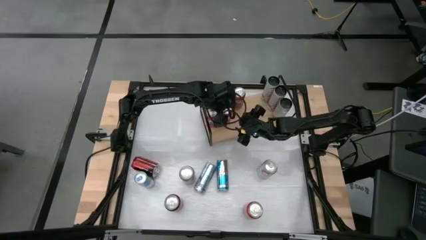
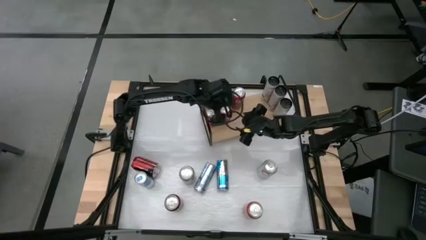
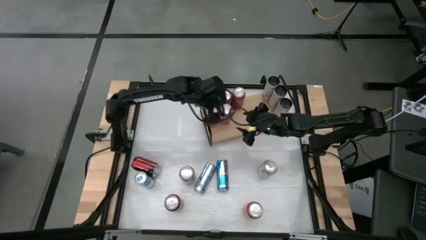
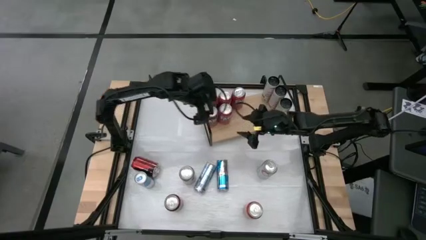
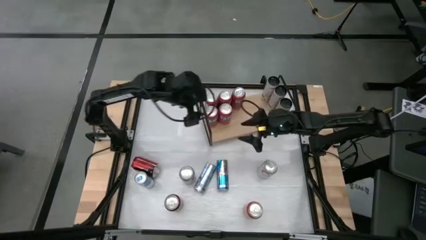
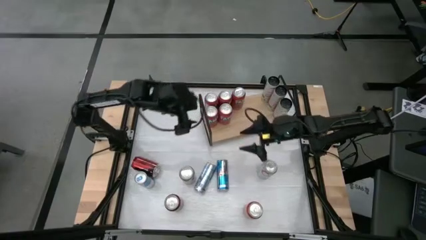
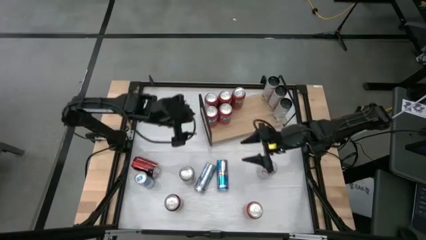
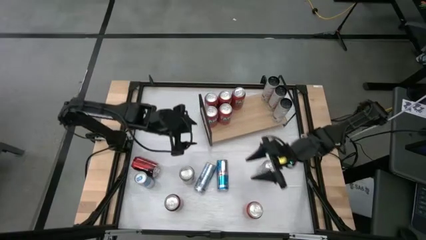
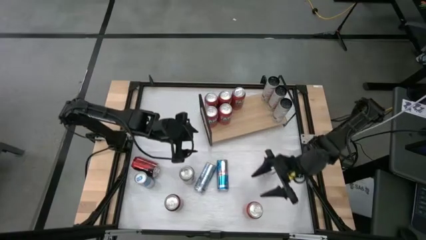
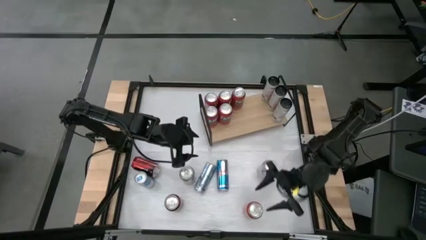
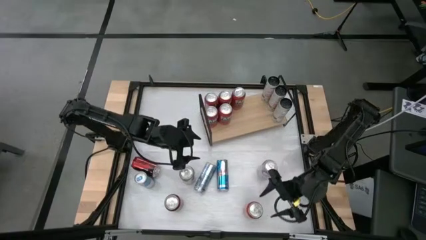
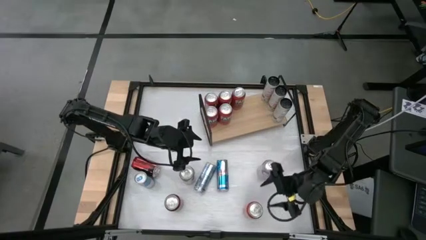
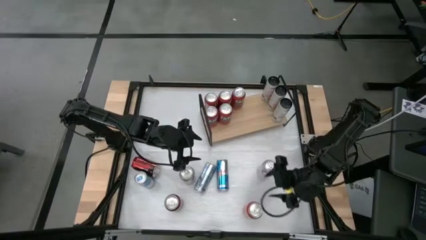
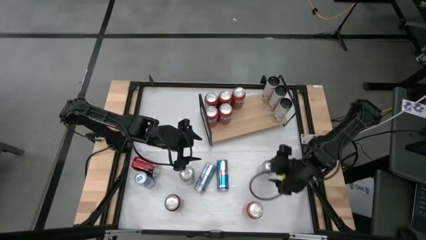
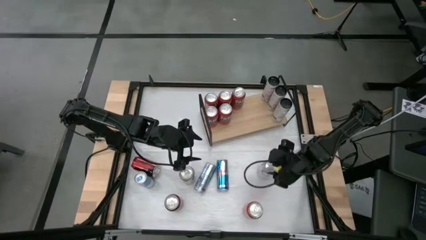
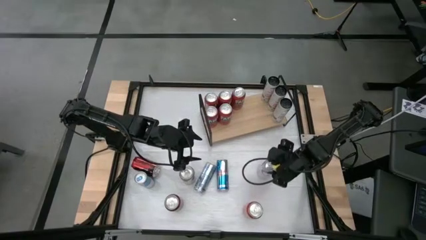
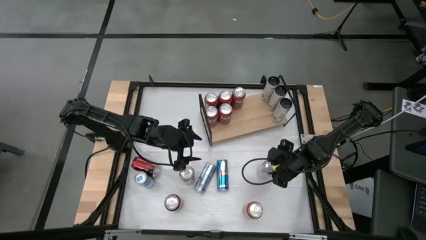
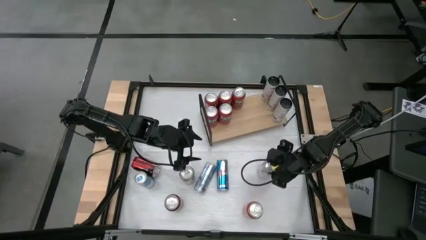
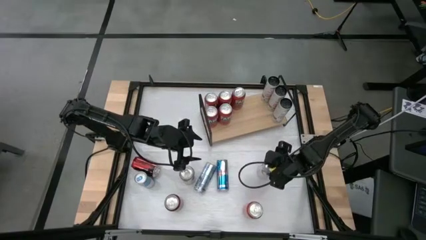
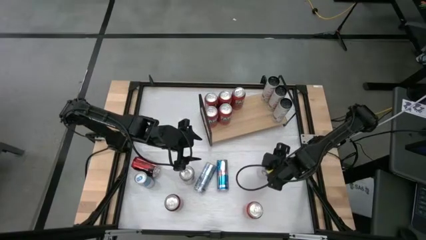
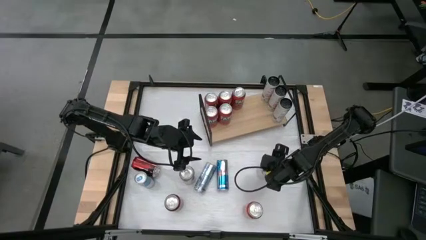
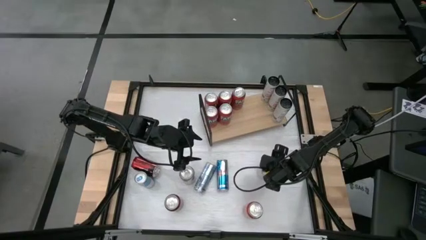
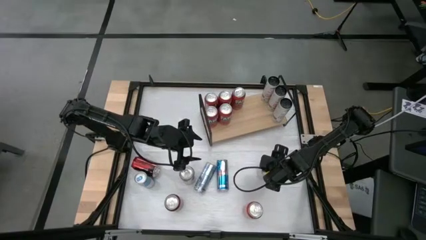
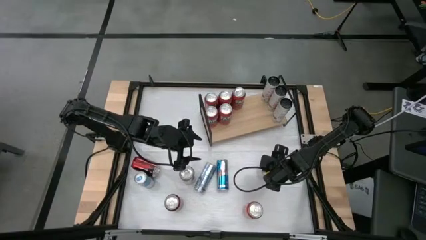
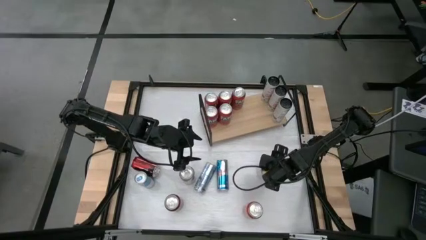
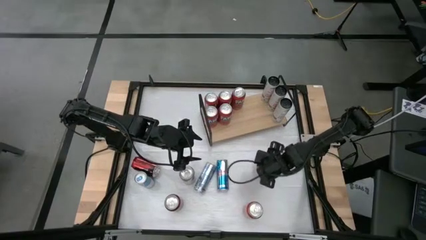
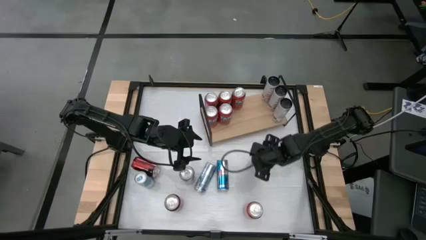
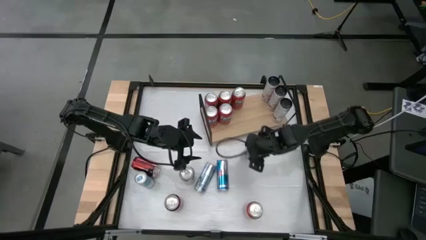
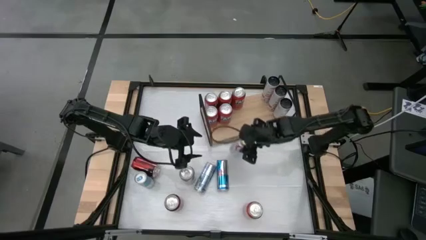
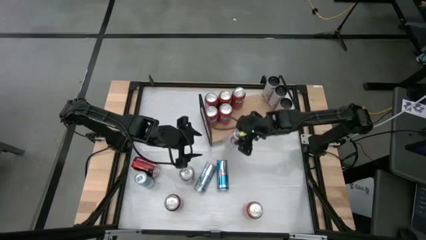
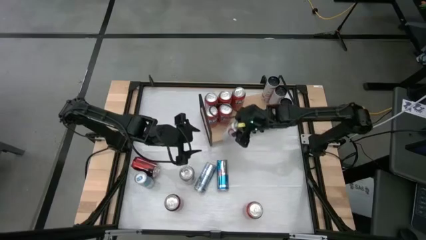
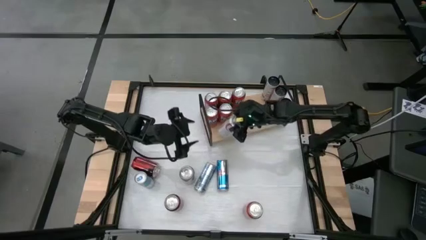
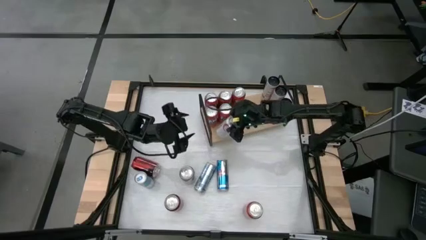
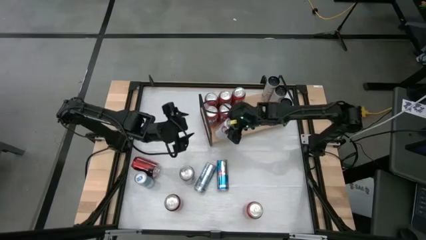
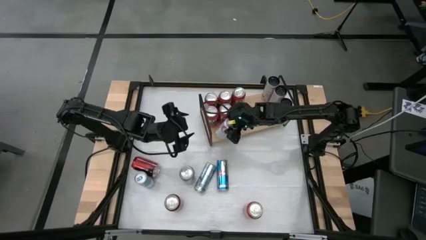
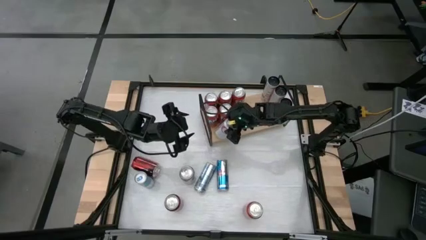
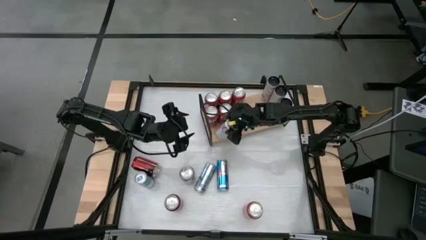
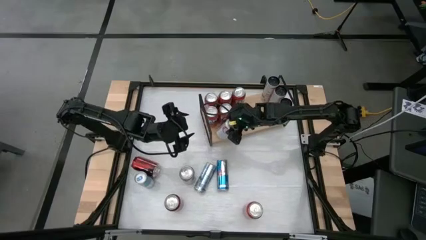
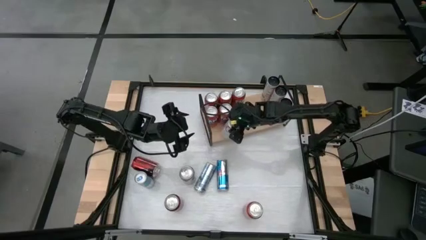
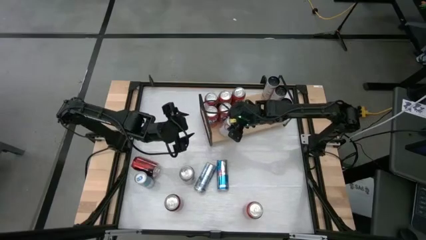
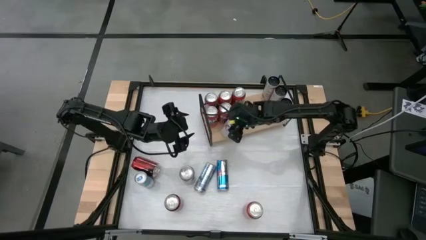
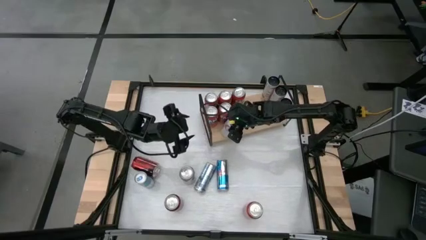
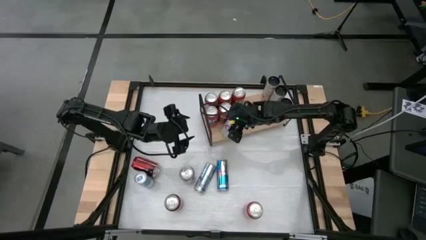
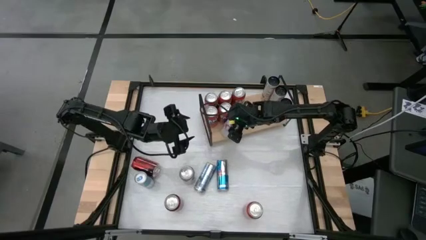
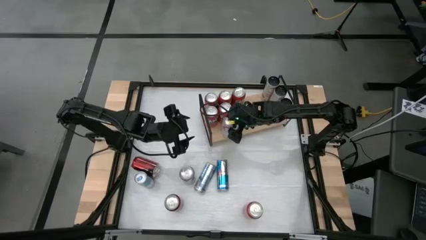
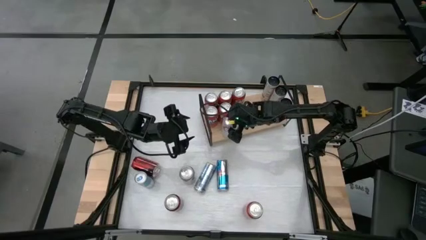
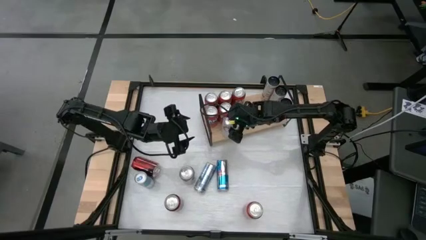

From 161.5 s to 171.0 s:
Task: Place canned beverage on shelf
Put the right white soda can on the shelf

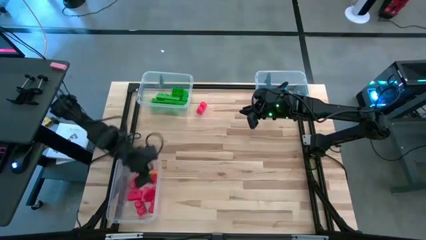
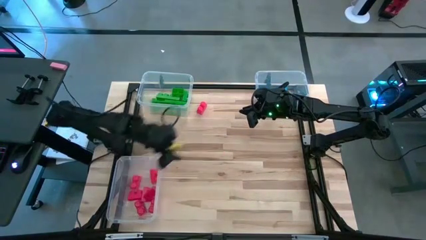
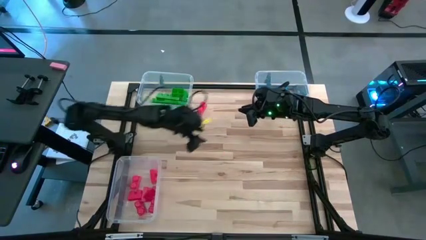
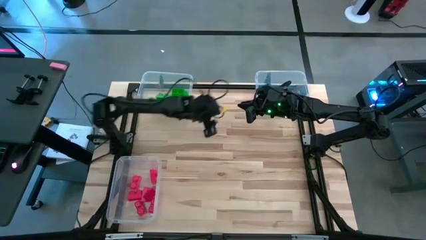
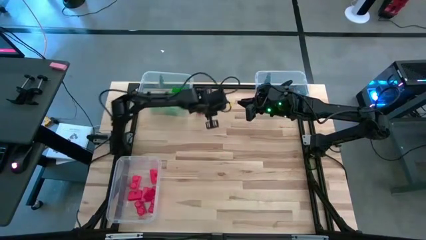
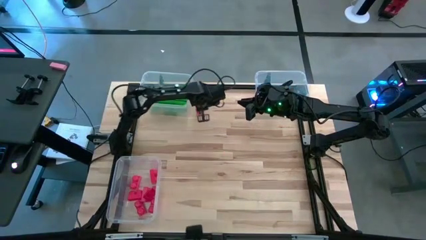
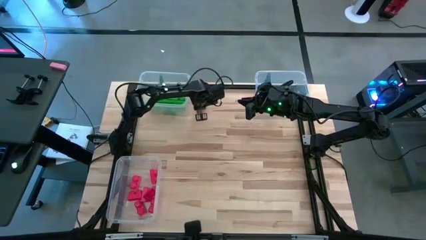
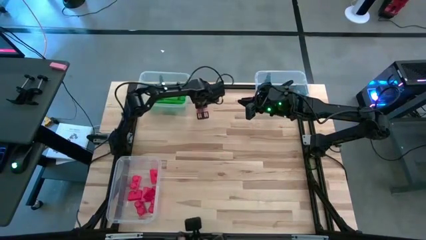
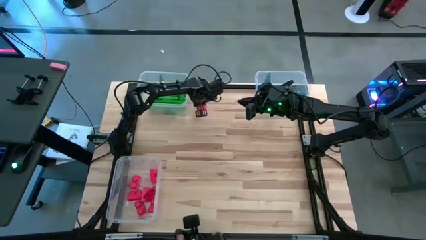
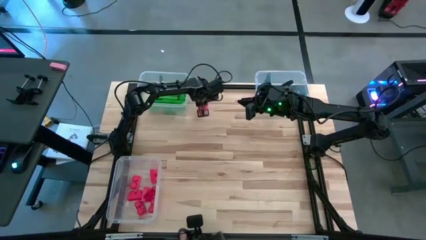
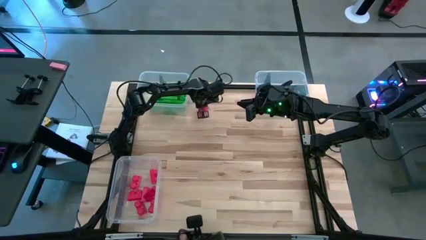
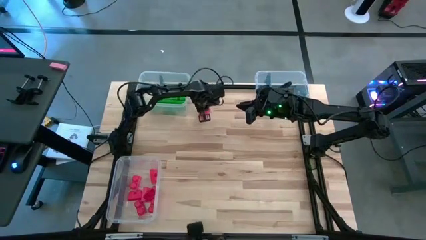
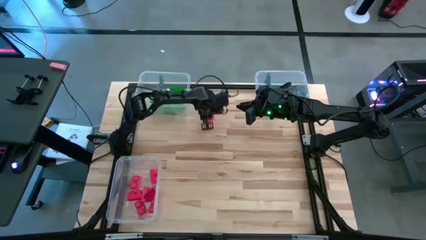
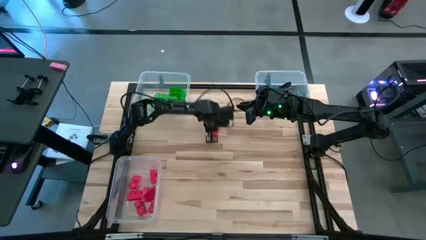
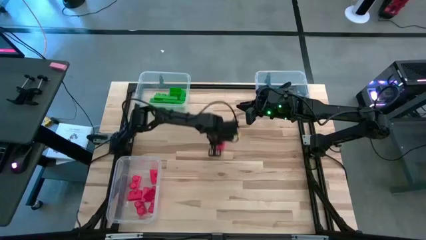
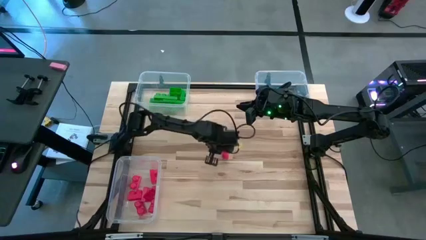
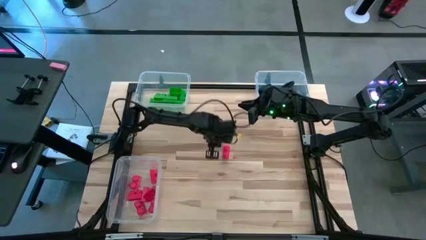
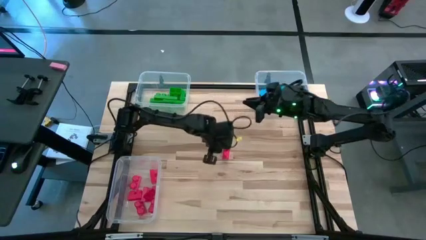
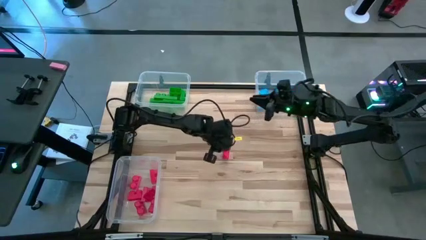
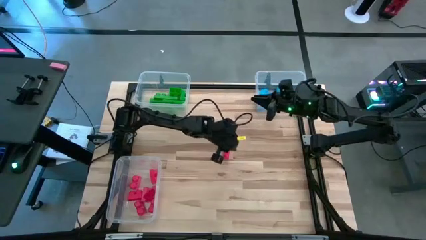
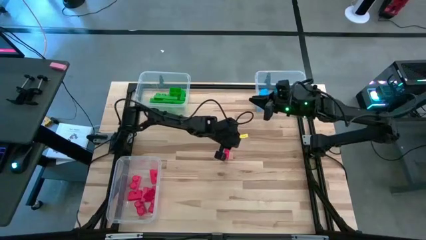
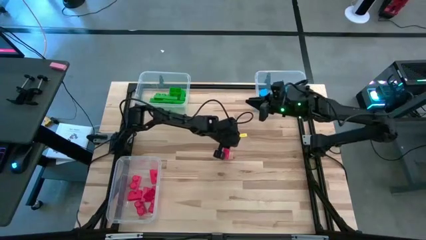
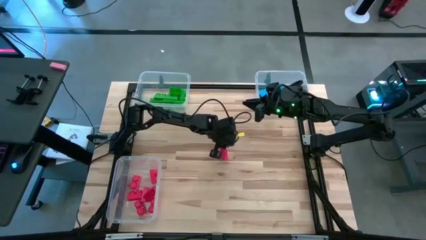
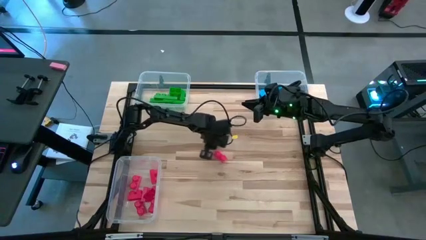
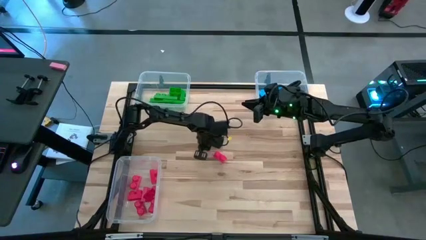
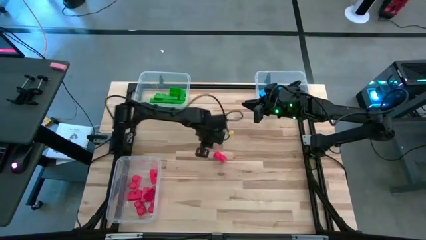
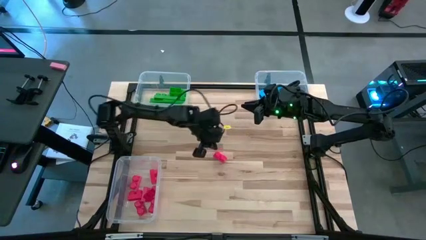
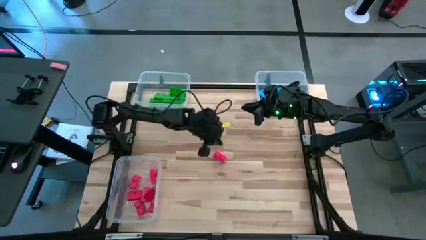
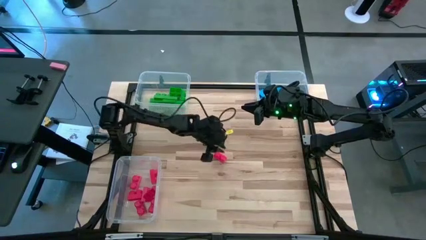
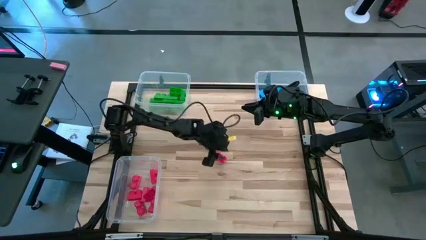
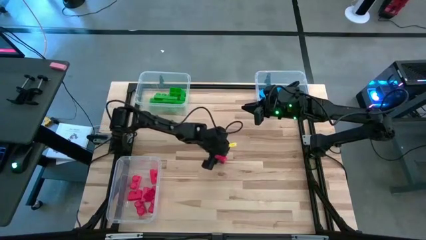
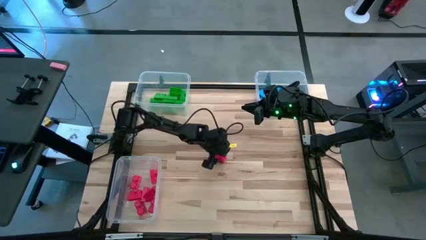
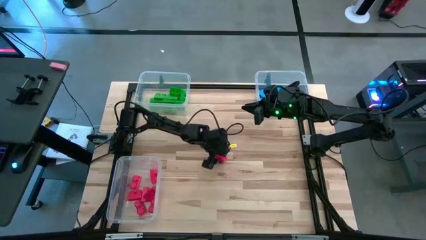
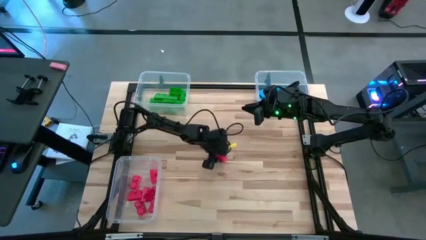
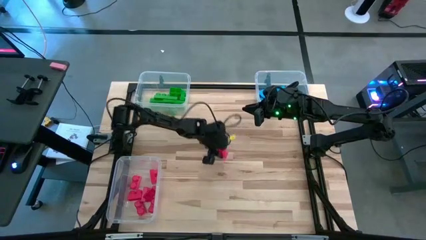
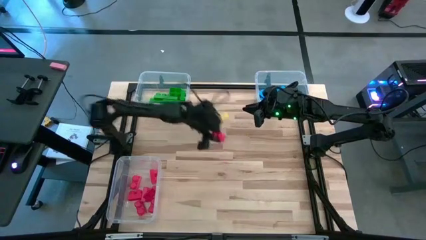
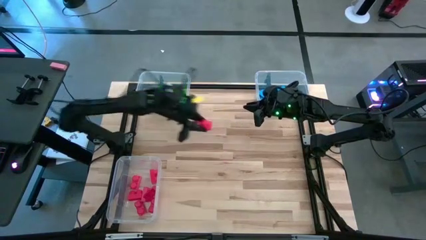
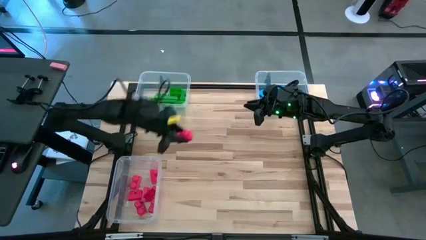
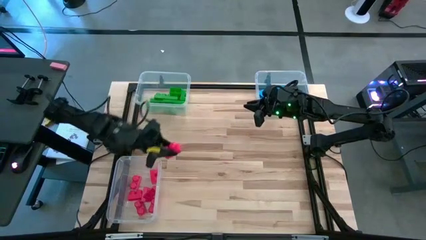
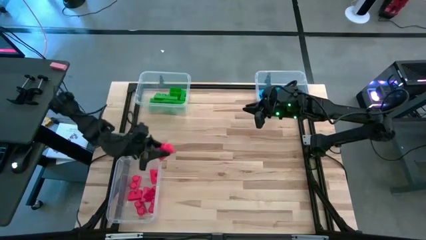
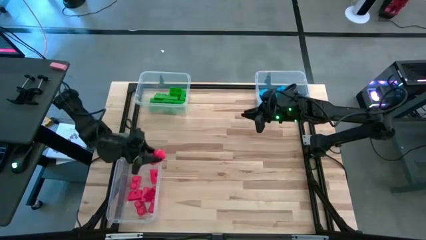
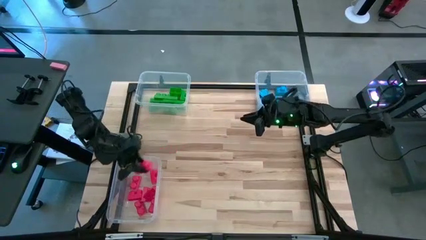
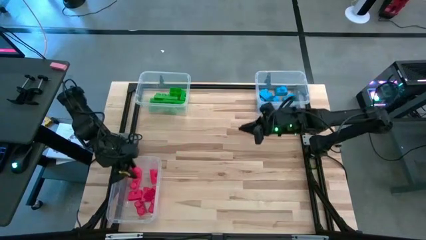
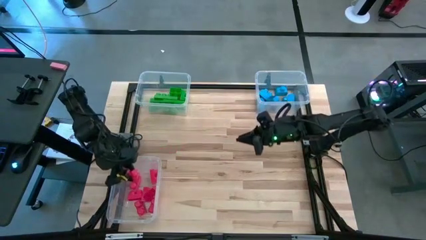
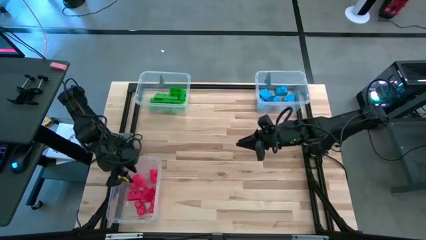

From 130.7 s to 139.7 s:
Task: Sort blocks
Put the red game piece into the bottom left transparent bin
